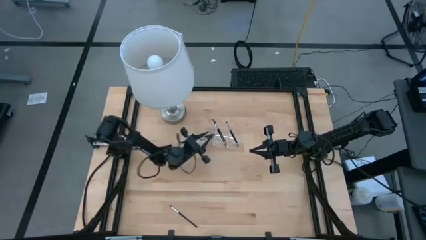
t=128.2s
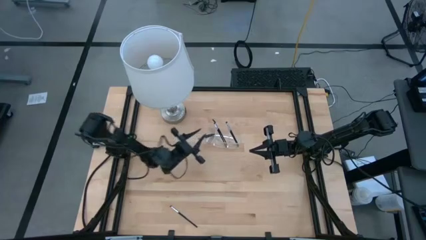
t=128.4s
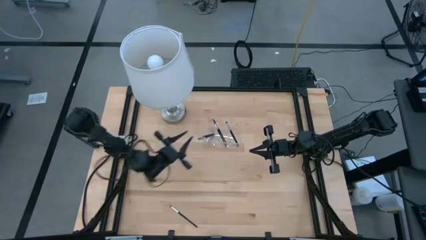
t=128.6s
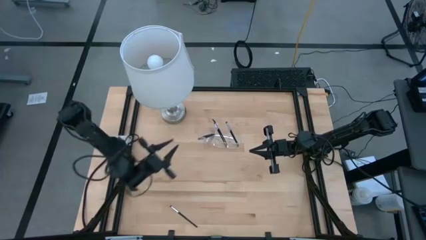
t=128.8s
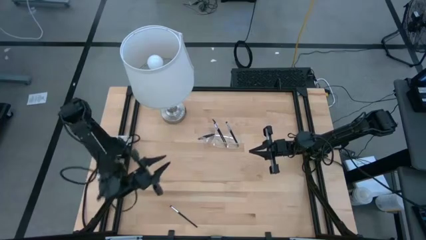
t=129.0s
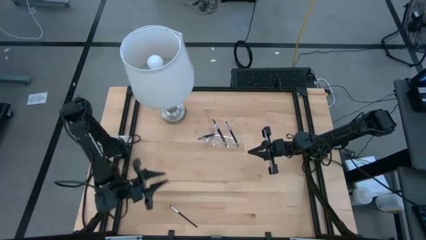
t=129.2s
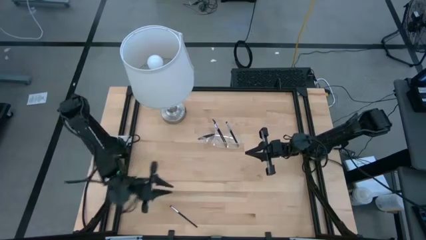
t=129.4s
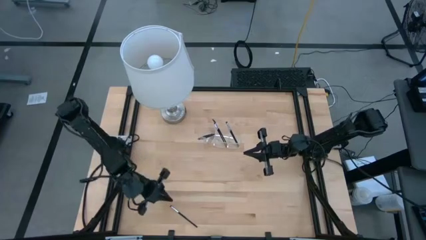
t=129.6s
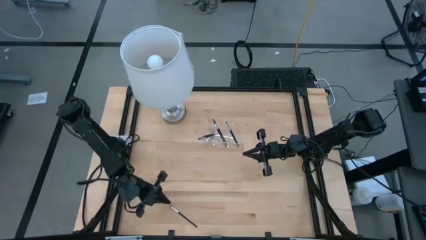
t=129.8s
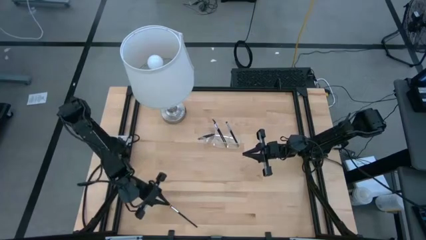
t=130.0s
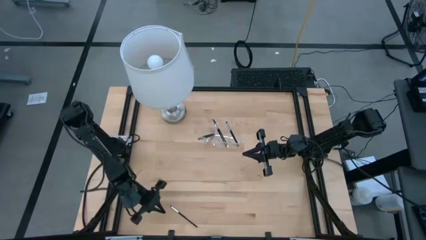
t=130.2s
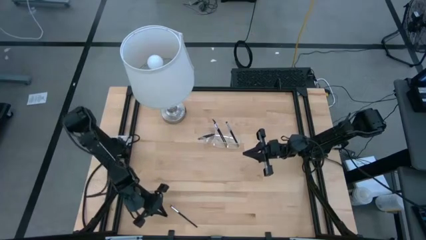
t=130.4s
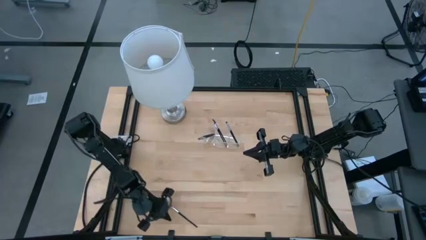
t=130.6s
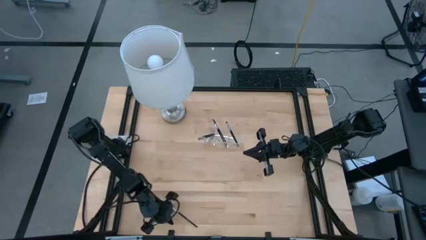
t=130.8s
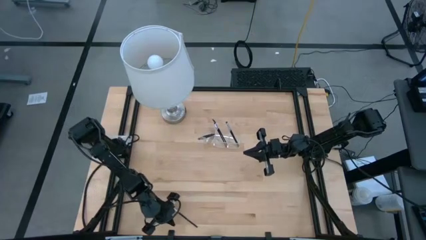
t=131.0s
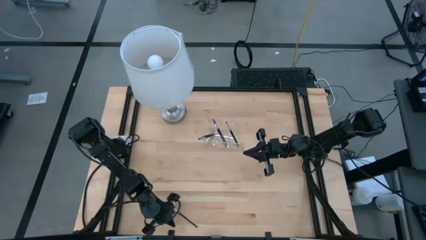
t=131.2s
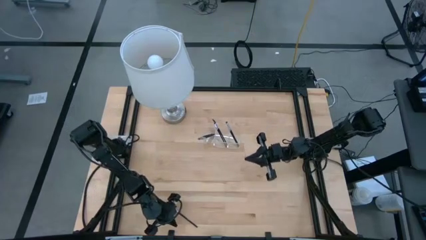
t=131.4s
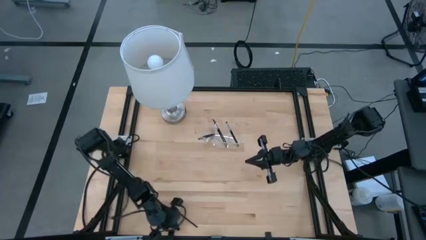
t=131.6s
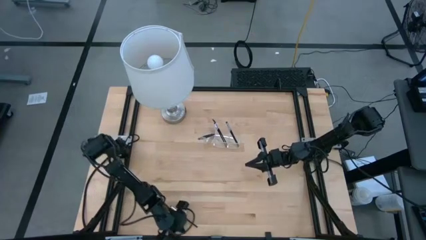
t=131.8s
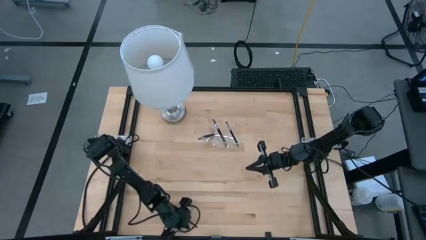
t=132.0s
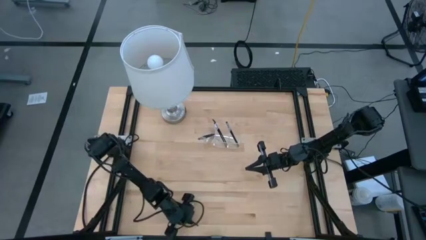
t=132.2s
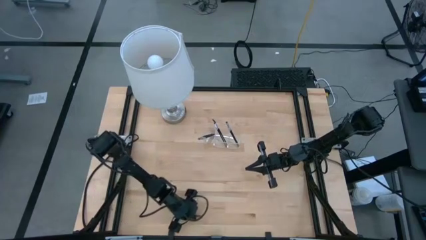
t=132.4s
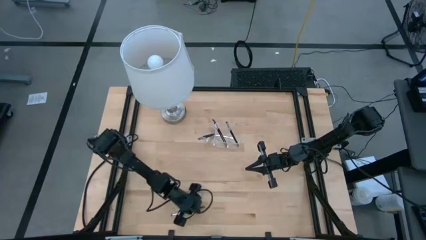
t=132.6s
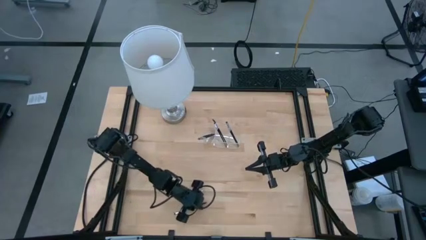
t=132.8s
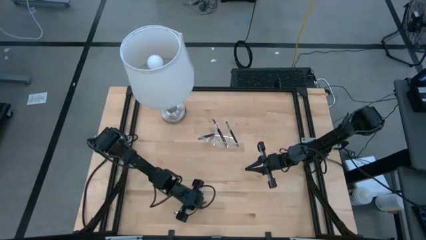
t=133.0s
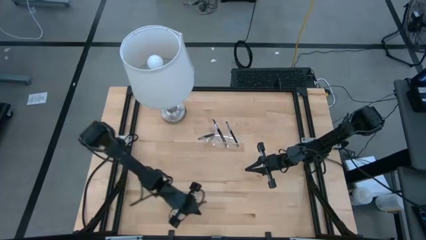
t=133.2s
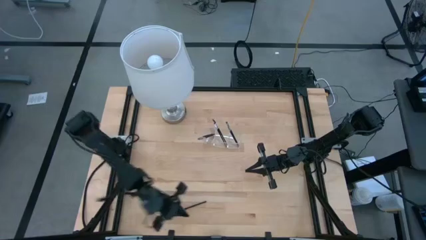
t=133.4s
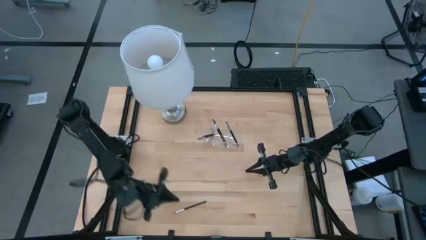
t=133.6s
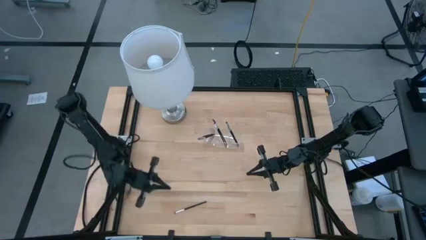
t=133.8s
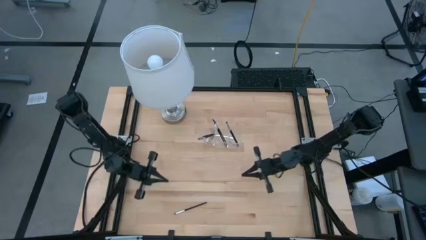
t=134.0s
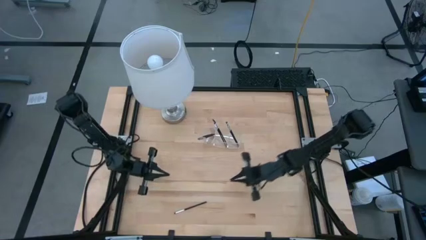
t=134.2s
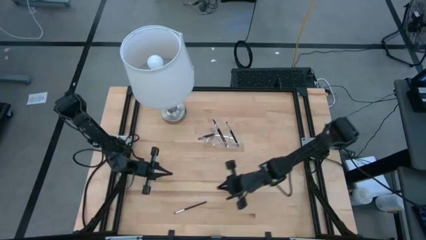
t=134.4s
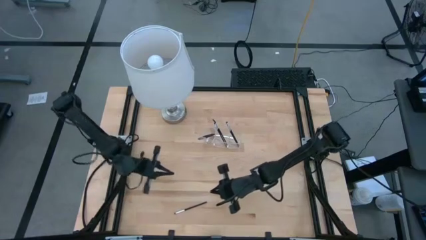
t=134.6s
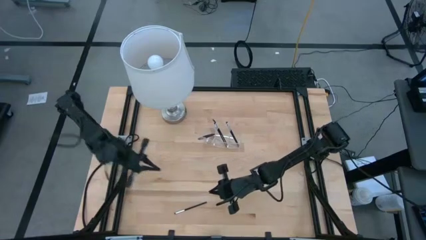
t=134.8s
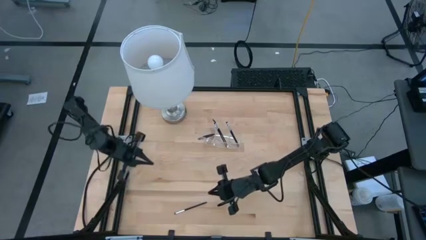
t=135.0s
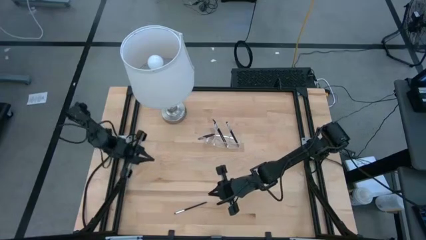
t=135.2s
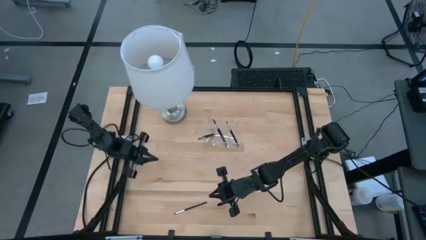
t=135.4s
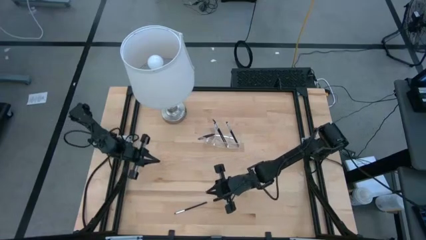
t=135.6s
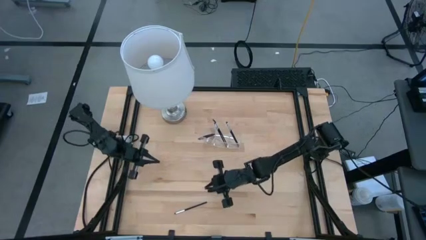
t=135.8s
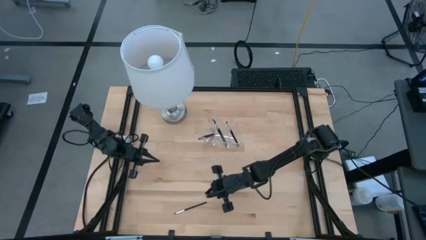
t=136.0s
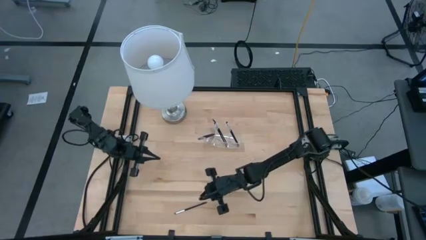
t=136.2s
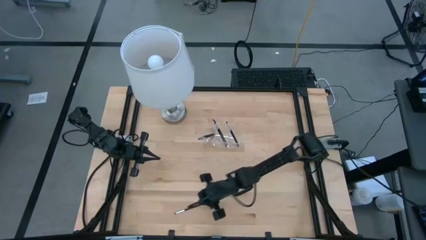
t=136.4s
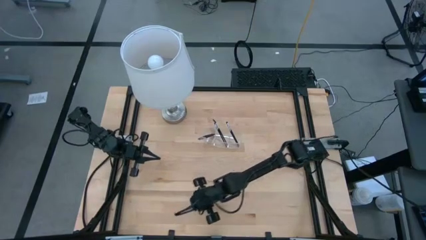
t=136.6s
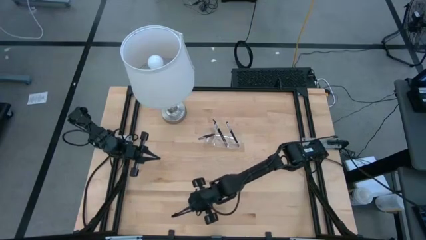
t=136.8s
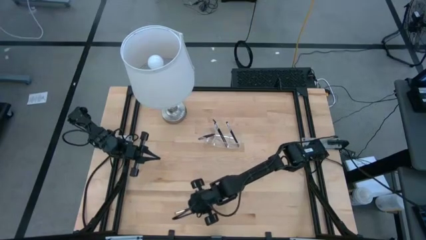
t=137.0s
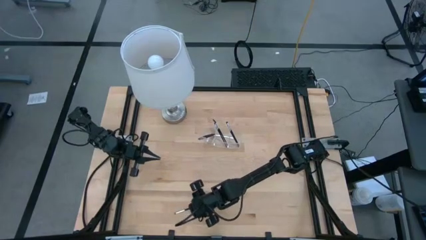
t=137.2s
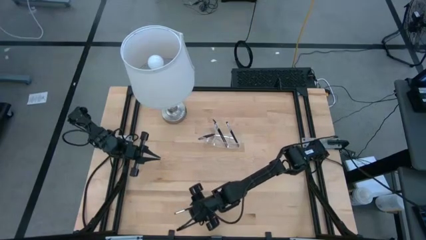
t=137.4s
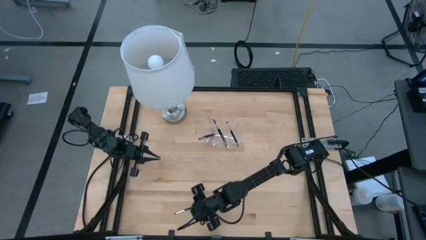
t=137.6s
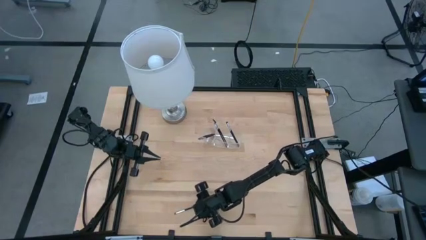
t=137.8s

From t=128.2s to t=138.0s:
Task: Sort items
Put the eyeshadow brush into the transparent organizer

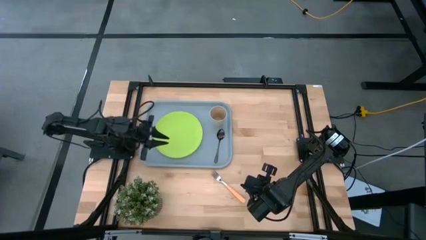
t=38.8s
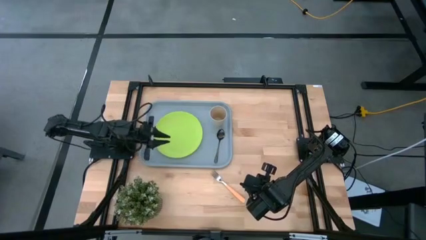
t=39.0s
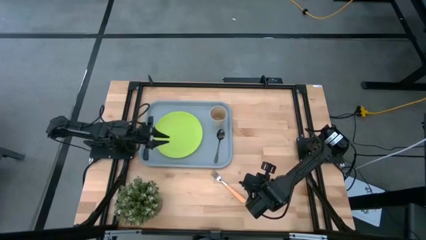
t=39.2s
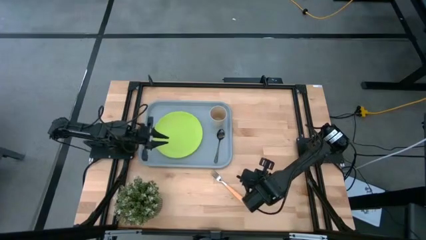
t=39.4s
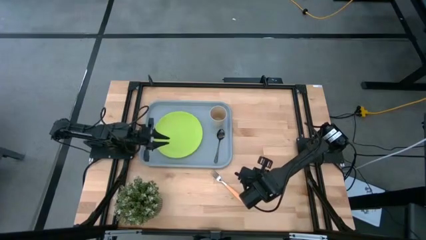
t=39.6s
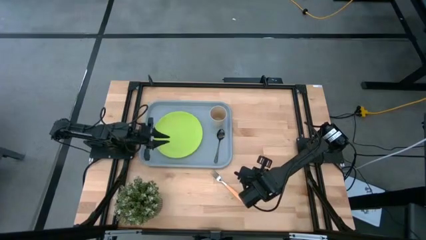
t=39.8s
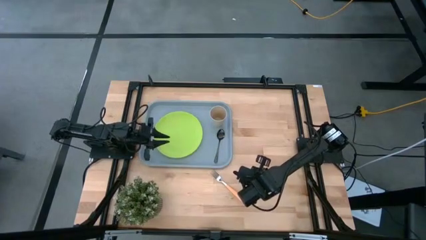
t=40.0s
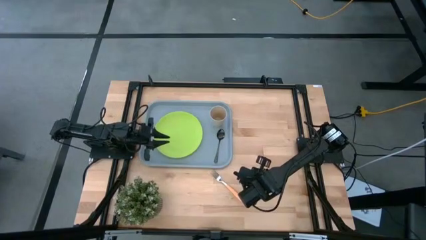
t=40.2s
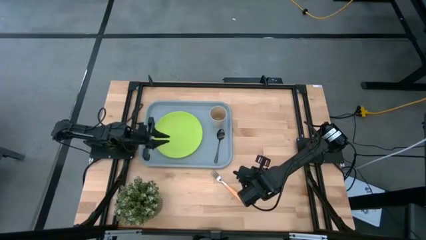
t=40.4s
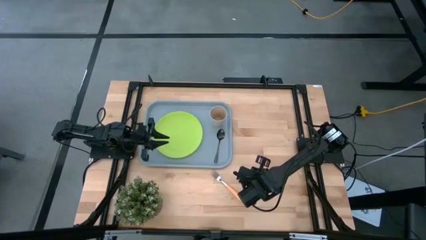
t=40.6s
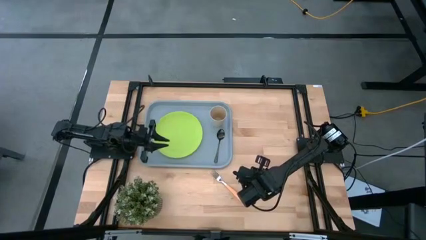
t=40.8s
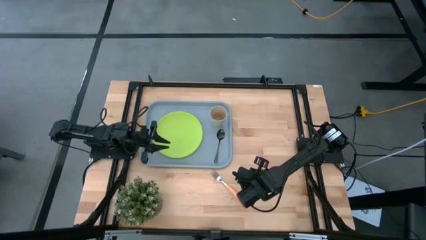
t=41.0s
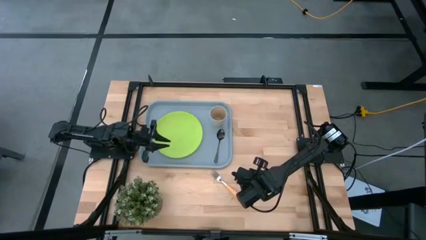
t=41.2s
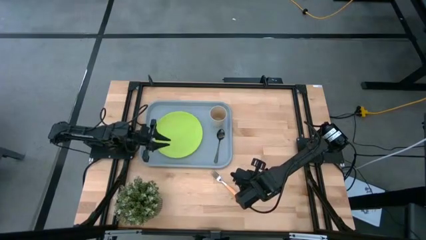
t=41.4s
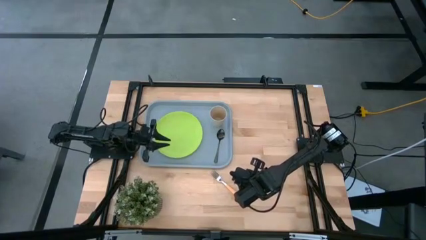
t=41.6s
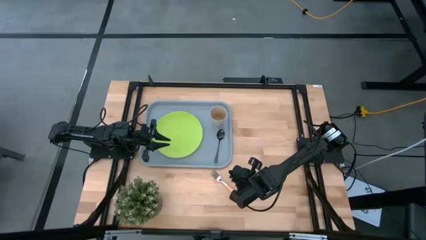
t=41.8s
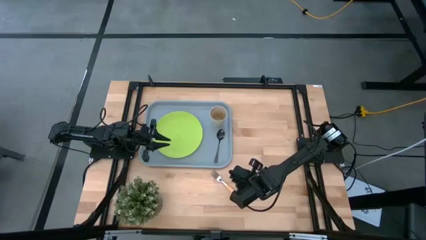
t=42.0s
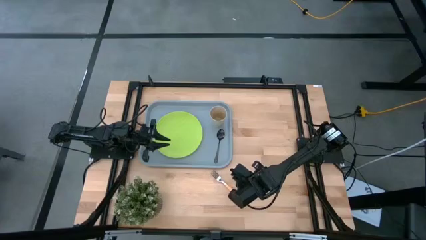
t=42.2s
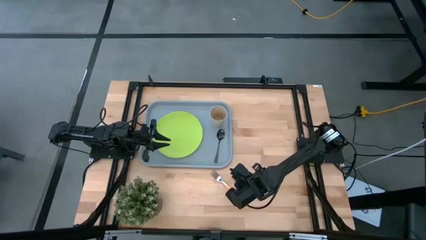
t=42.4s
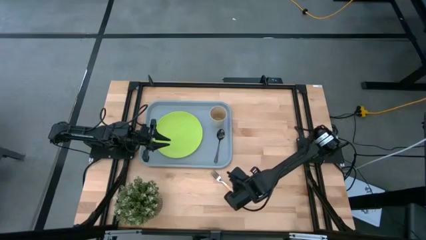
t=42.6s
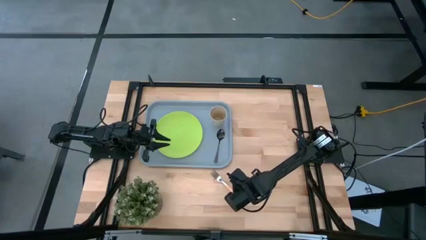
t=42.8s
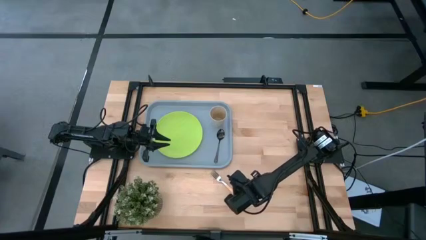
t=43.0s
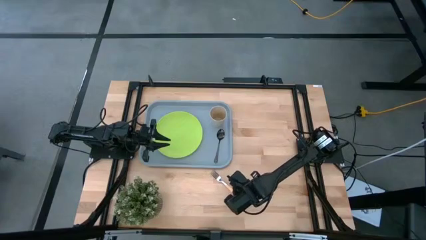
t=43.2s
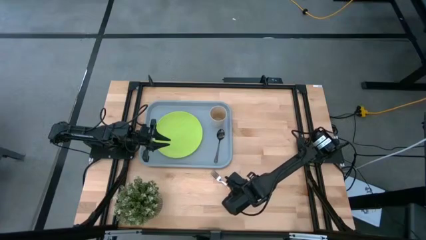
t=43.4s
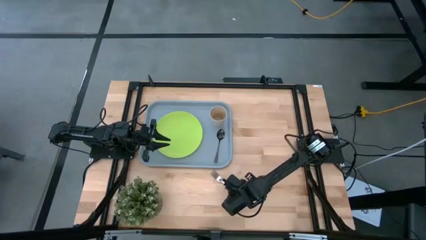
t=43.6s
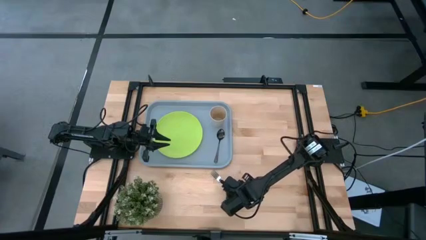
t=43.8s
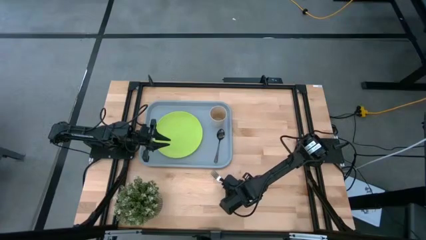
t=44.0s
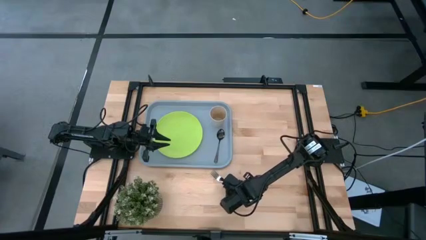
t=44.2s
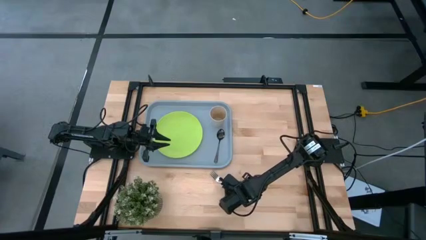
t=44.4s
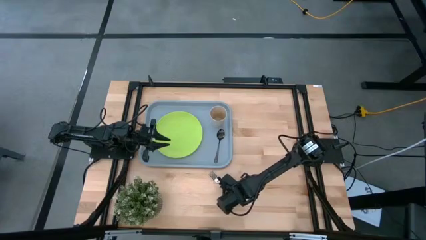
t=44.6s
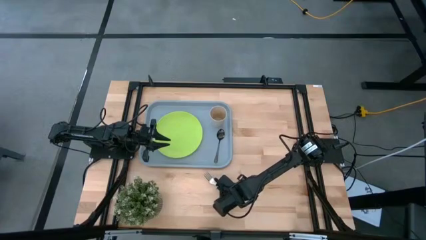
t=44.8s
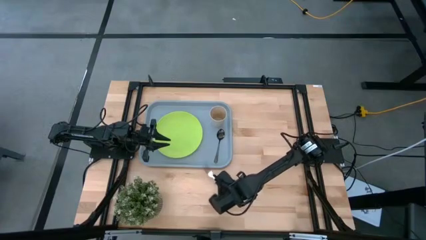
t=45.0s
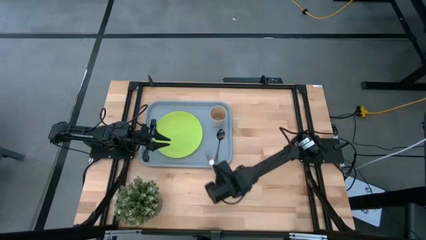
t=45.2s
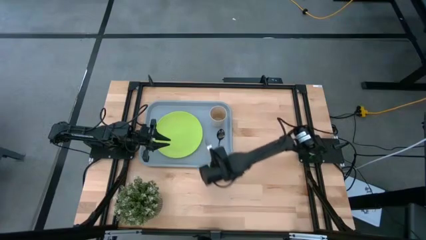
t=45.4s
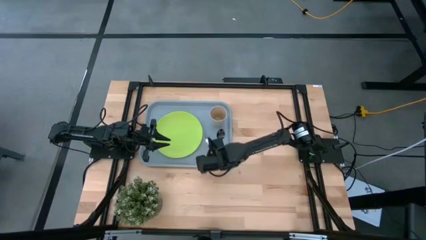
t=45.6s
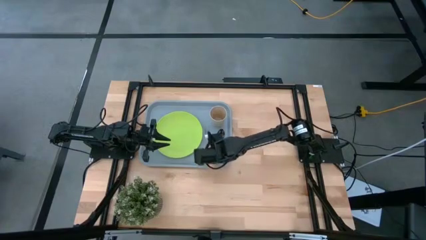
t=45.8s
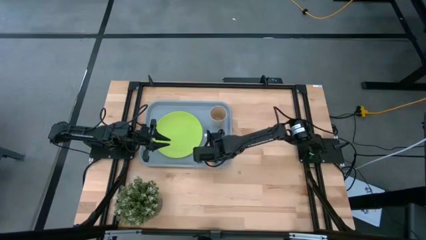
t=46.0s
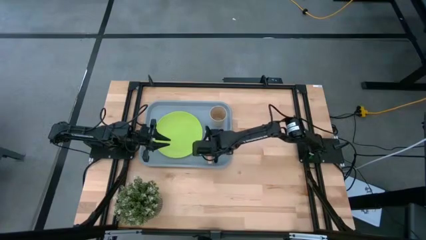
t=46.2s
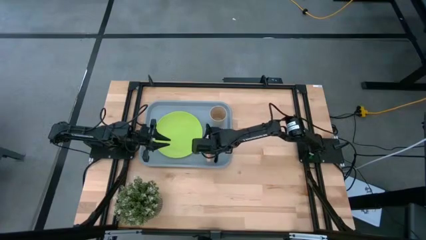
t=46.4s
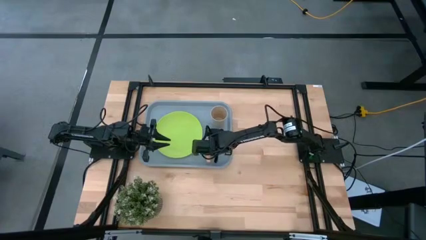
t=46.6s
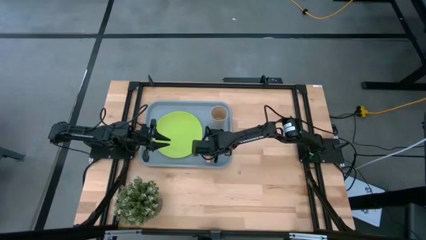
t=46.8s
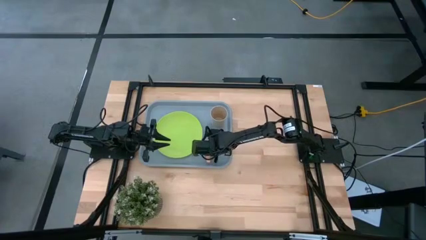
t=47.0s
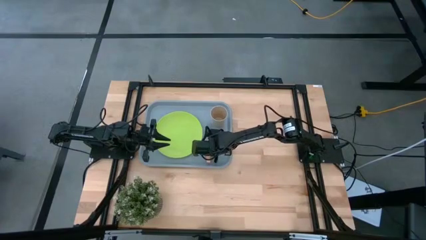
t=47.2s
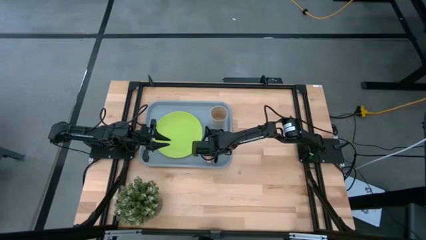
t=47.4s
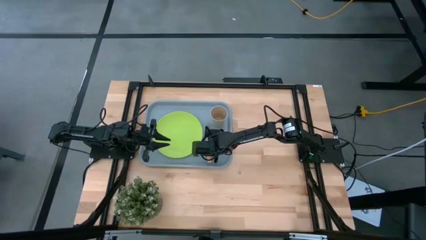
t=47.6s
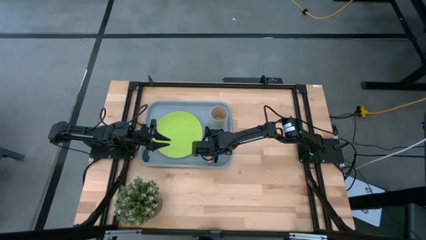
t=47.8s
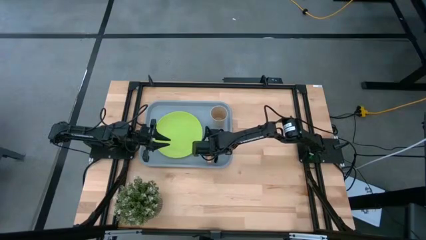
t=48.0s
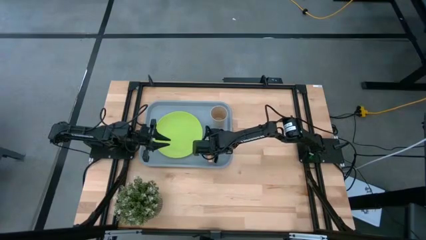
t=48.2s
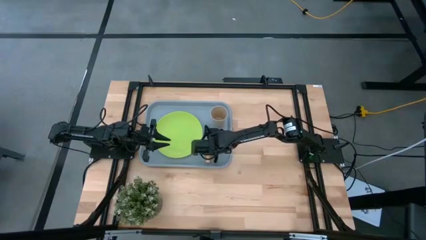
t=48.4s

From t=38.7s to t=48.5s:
Task: Pick and place plate/cup/fork/spoon on tray
Put the orange fork on the gray tray to the right of the green plate
